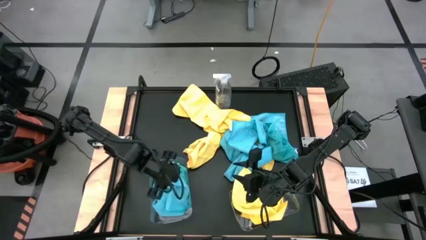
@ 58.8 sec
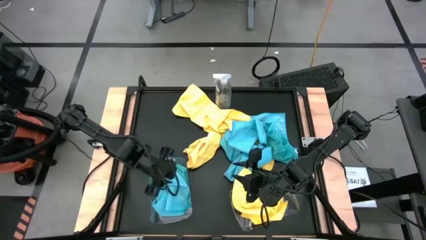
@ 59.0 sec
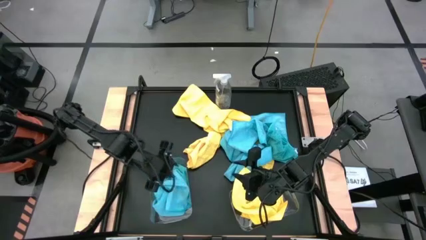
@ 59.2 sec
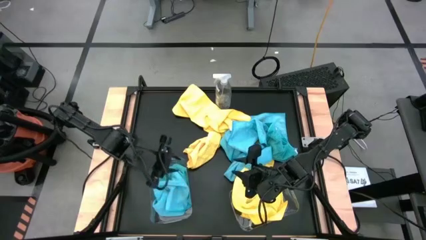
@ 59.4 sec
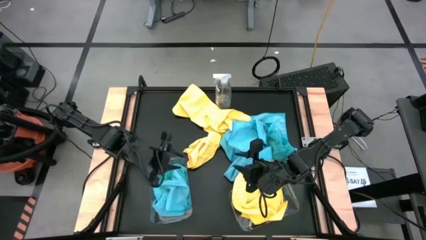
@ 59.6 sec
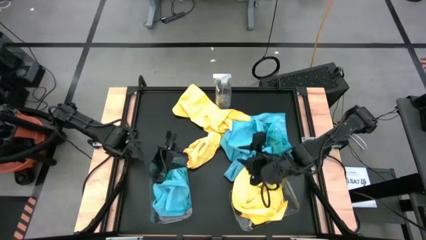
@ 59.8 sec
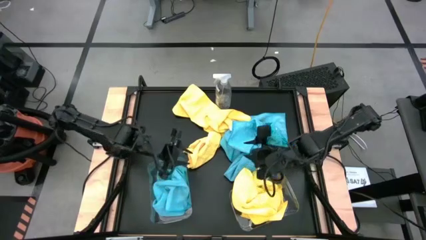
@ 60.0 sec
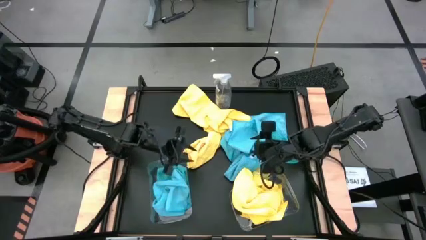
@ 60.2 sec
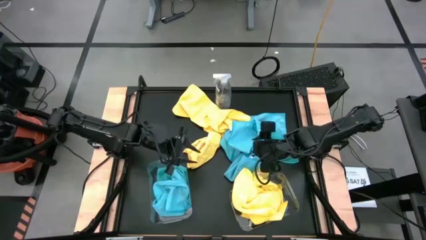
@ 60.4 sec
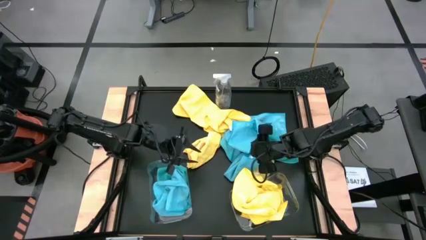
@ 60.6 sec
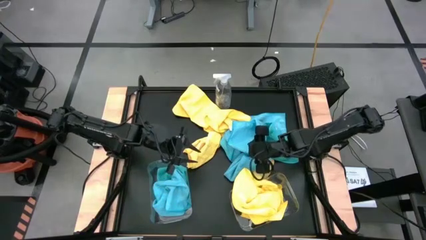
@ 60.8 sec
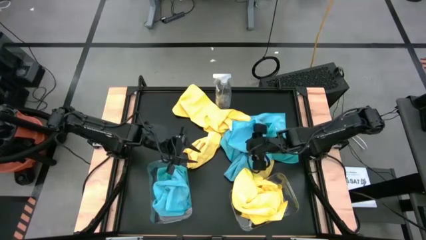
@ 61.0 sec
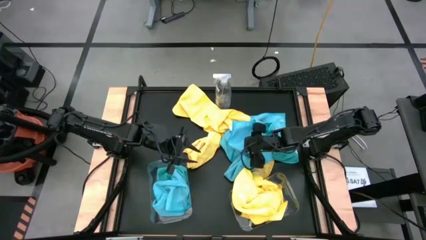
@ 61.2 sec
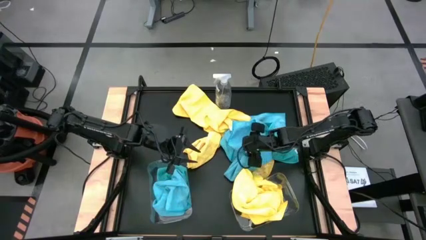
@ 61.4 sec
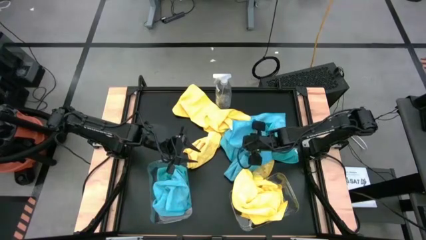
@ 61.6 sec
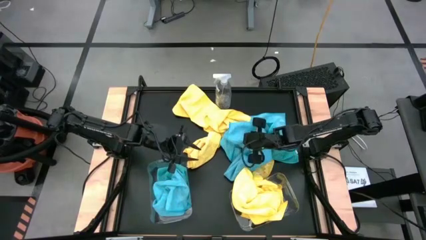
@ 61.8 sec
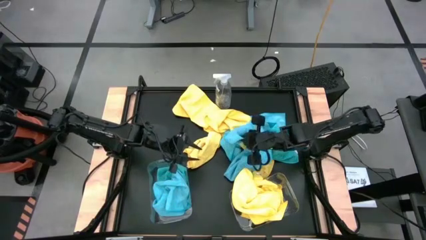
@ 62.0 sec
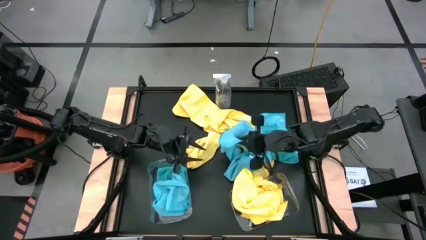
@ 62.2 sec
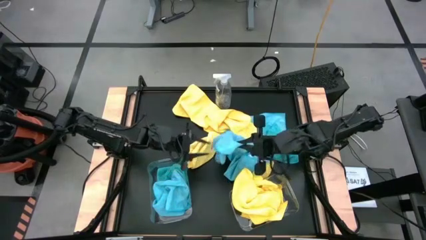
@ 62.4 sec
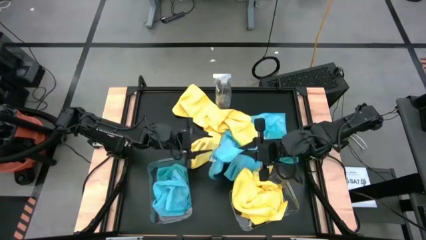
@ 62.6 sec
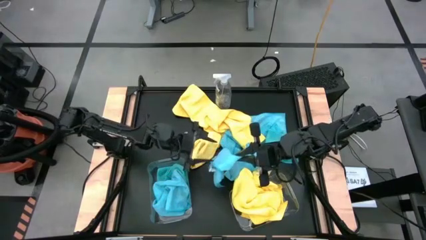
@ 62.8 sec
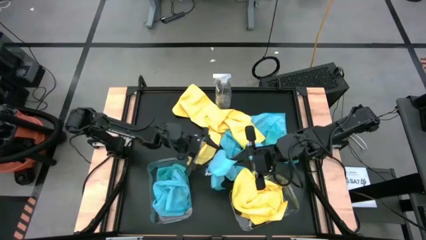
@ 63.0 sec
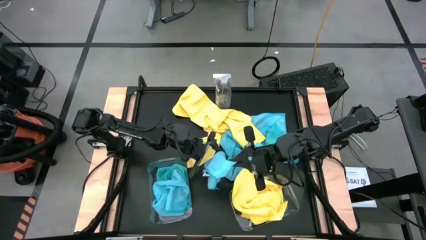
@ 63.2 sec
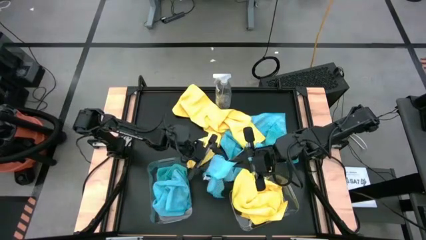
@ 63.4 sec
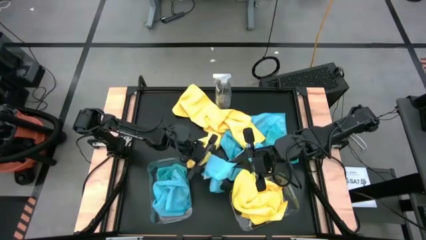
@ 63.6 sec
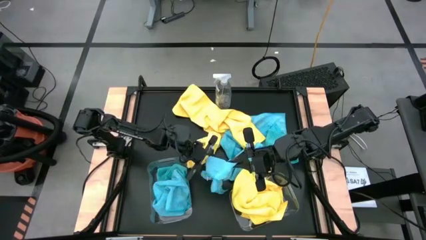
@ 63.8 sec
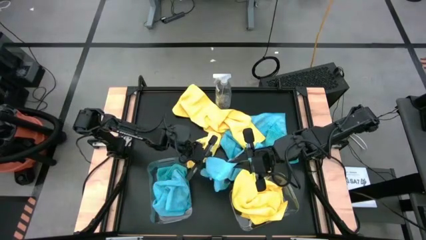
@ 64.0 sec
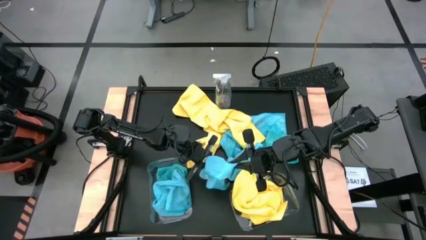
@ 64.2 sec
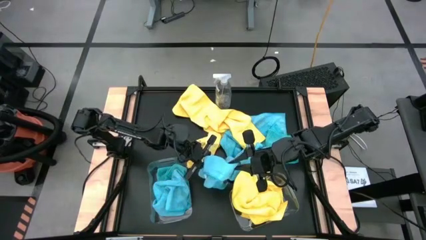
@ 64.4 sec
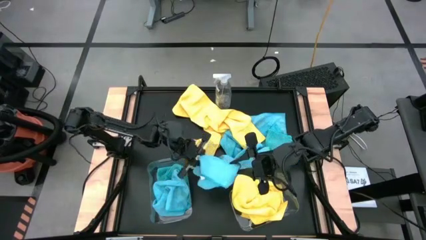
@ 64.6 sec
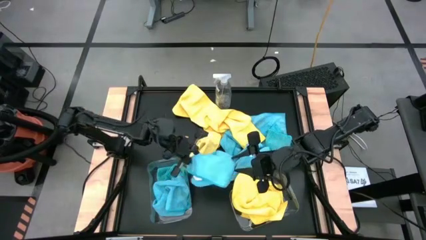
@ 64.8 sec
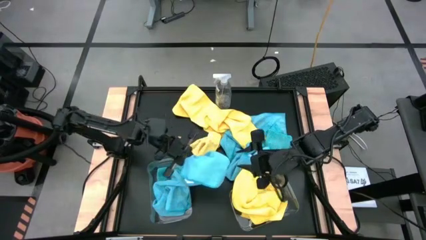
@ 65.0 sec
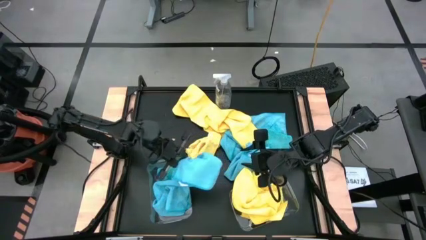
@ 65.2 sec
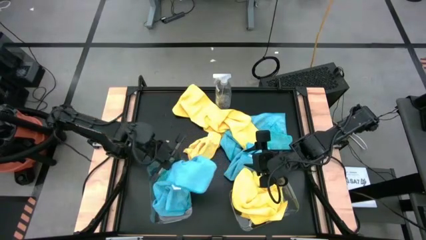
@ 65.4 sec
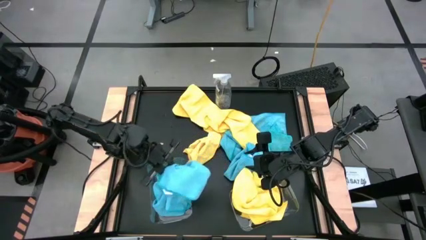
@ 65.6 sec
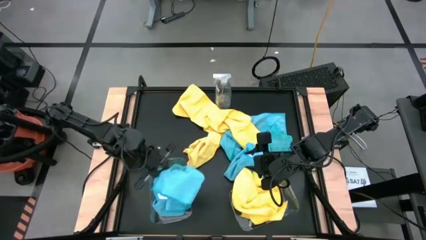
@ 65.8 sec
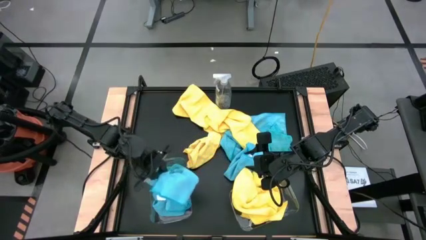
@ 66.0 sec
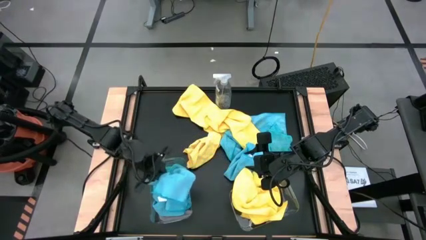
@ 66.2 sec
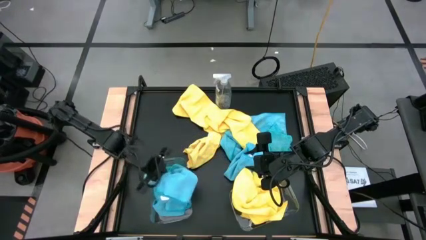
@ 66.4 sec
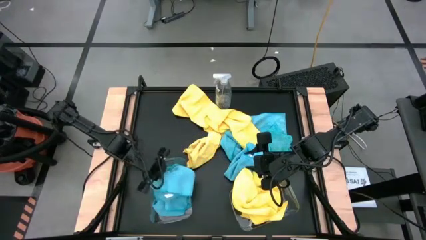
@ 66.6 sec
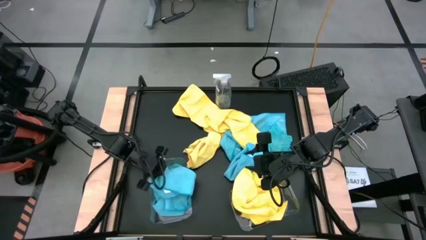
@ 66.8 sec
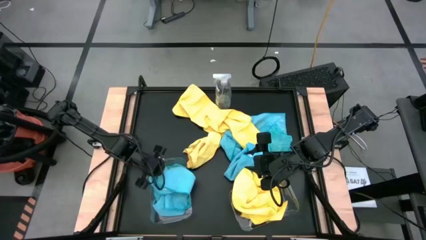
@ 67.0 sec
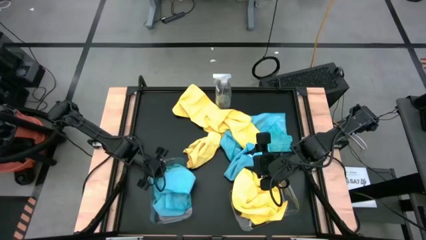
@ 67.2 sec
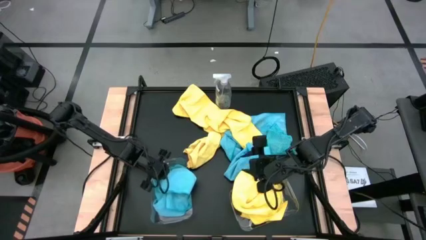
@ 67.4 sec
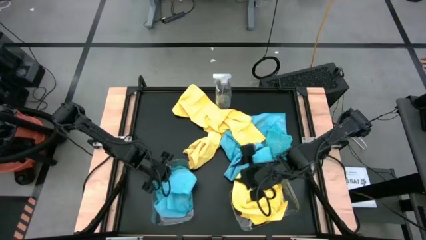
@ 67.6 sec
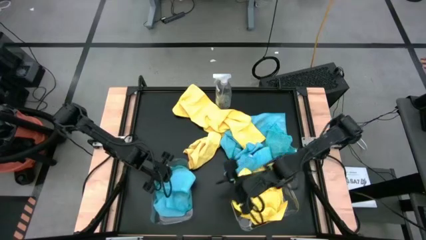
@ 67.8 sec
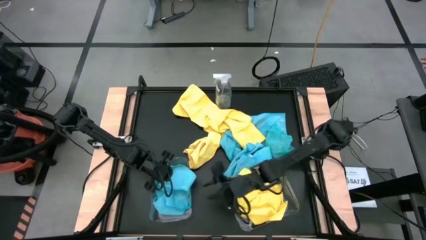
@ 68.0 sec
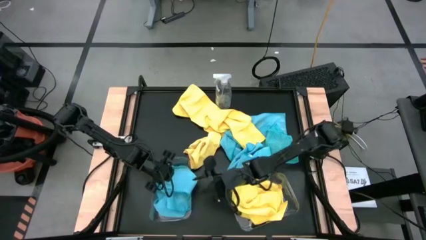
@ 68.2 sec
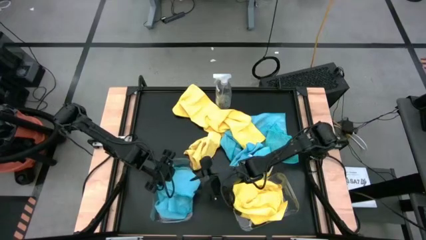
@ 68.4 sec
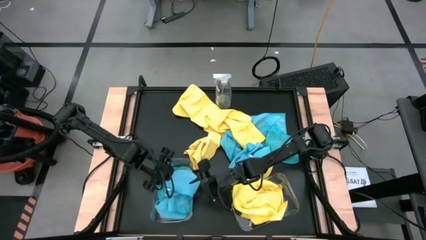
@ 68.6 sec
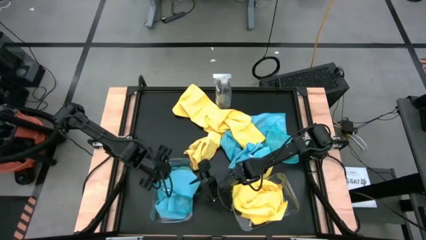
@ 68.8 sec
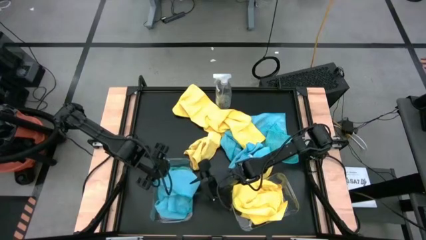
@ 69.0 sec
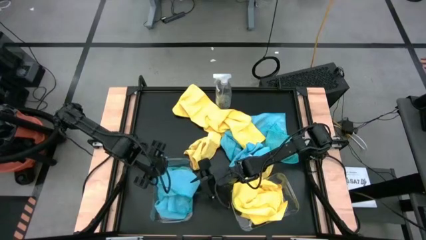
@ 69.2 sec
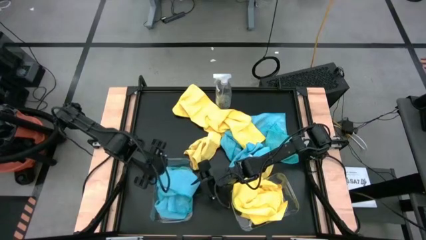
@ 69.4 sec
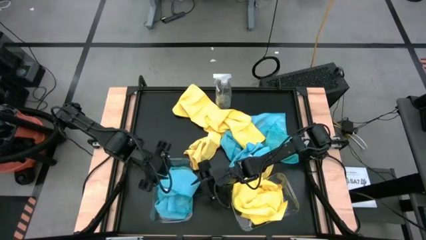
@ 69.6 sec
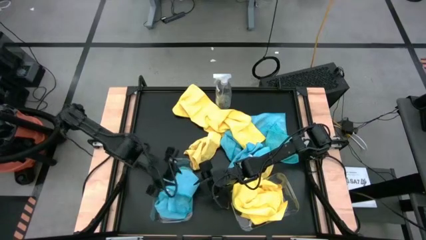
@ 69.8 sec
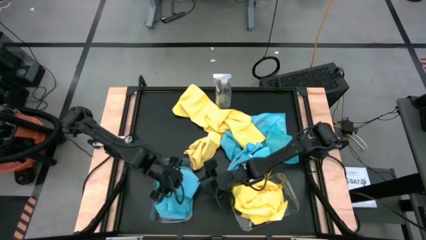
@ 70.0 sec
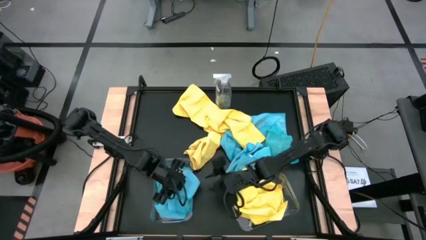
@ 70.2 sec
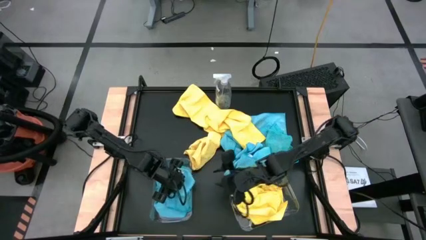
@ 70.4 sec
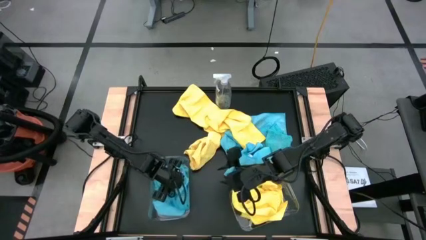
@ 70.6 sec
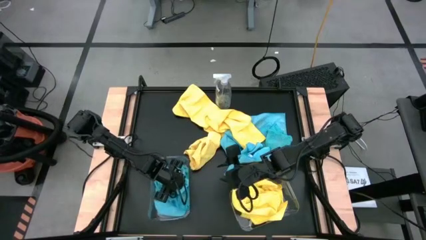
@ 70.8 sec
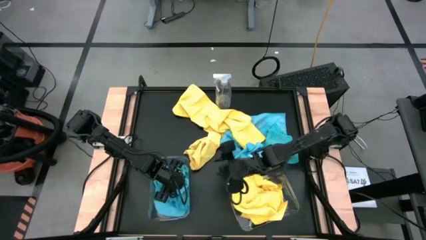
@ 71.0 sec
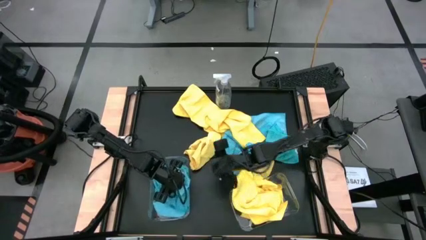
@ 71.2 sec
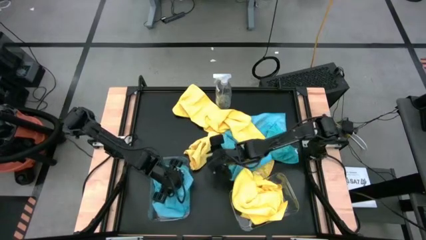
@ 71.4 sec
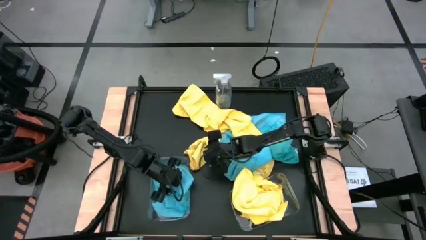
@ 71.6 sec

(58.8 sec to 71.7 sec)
Task: Sort microfiber towel by color & place in baskets
Put the blue microfiber towel into the left transparent bin

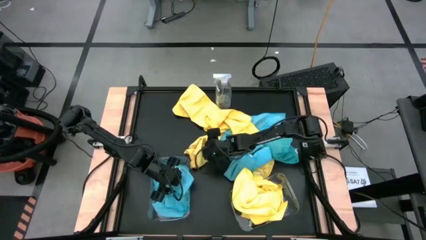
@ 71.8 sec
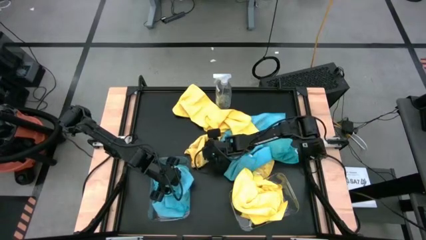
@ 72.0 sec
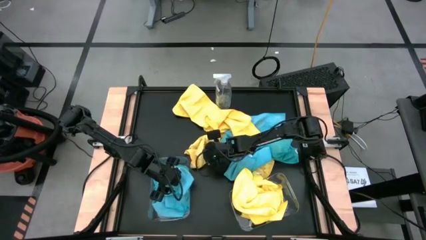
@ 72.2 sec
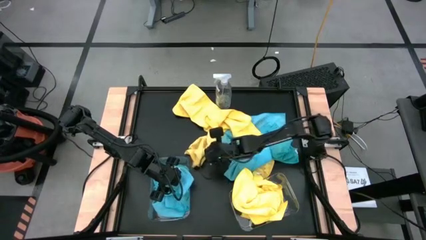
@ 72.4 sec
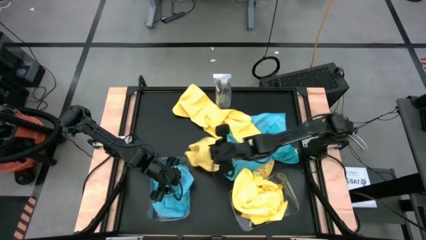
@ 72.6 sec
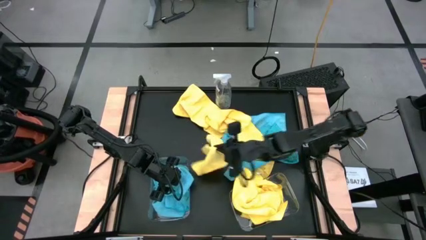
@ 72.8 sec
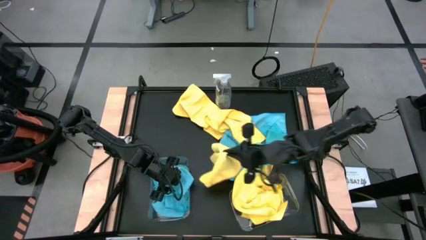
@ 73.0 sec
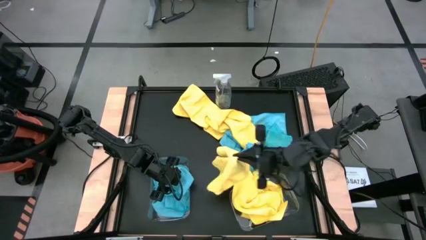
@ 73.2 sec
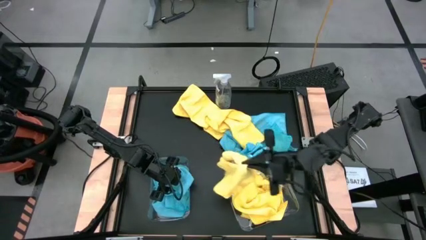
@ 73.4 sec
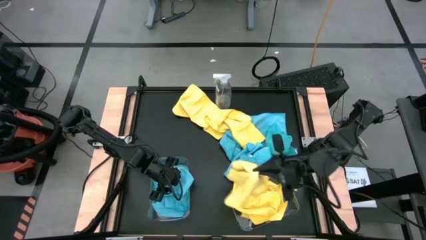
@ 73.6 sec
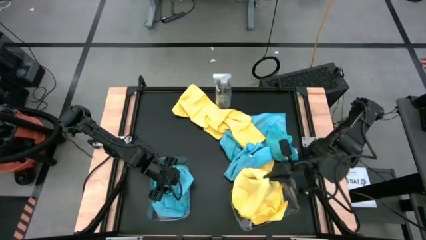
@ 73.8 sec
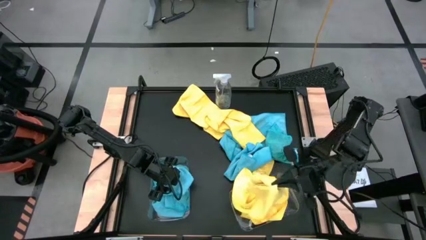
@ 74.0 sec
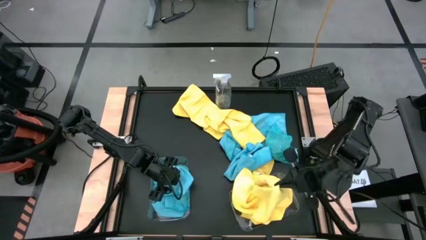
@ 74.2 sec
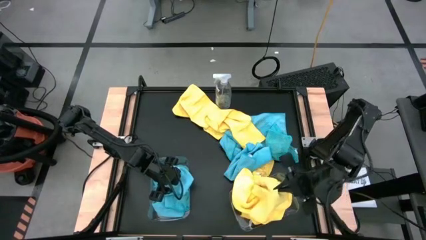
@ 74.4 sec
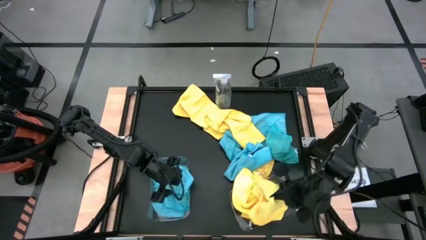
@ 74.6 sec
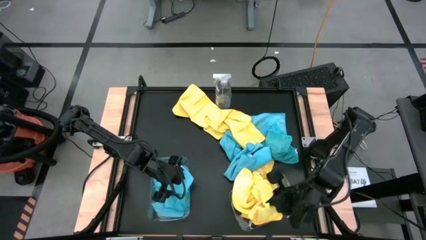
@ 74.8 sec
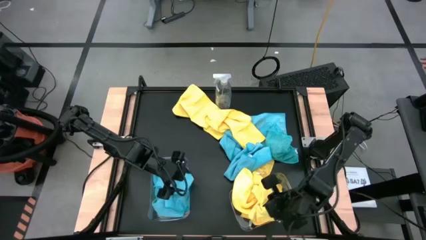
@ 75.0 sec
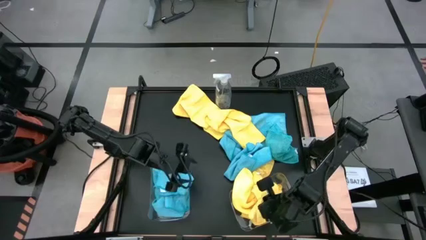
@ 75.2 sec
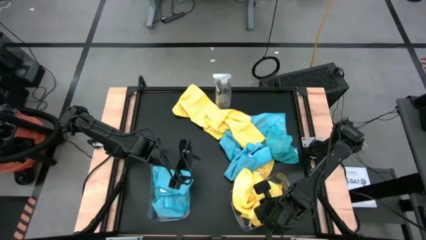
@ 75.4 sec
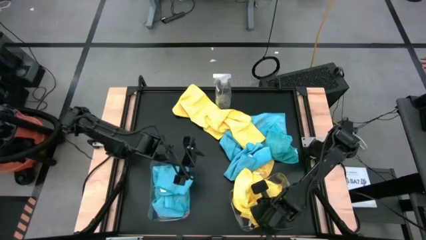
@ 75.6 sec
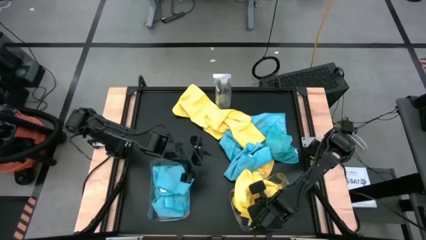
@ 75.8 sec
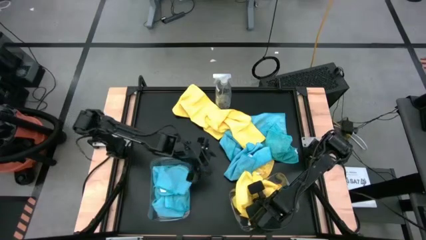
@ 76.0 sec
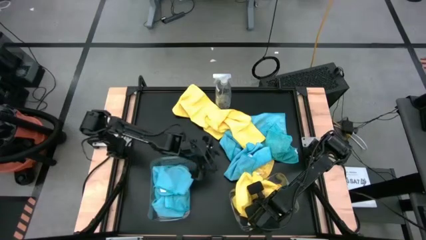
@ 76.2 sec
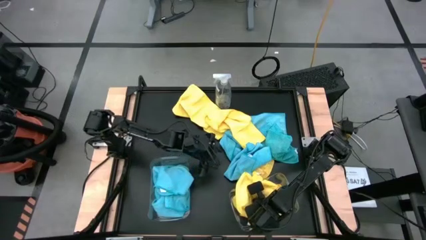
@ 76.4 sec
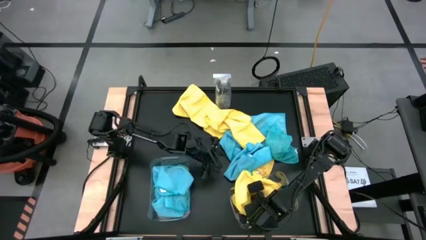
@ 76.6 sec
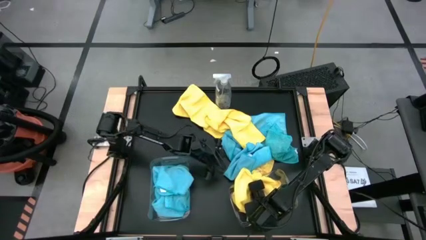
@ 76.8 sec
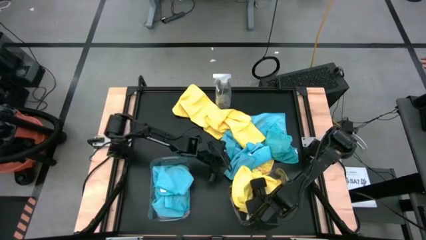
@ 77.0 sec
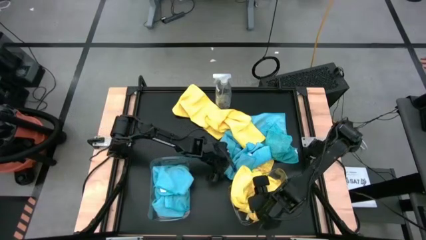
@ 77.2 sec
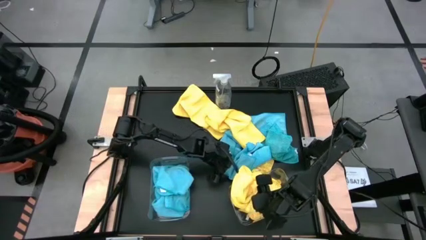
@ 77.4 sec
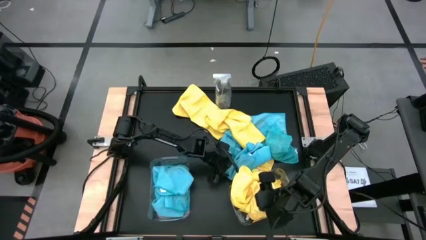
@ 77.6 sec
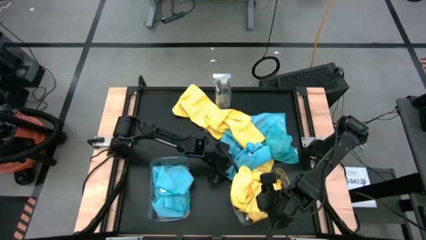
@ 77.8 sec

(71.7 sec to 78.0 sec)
Put the yellow microfiber towel into the right transparent bin
